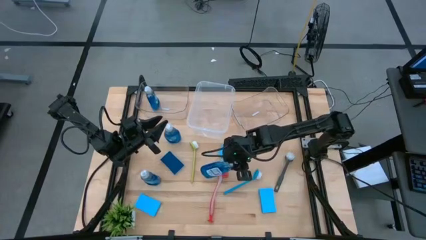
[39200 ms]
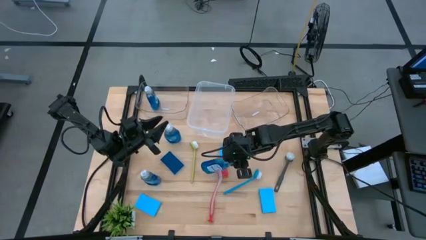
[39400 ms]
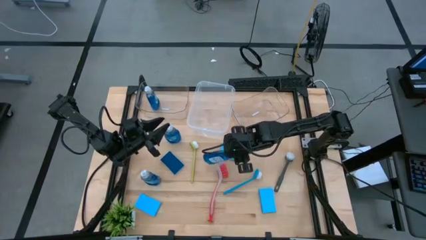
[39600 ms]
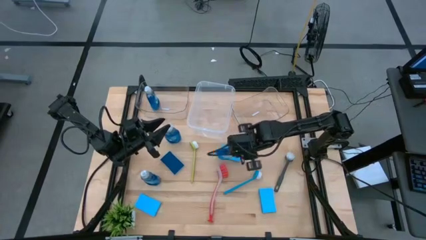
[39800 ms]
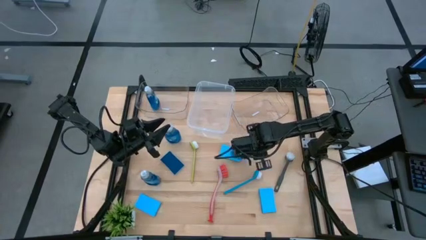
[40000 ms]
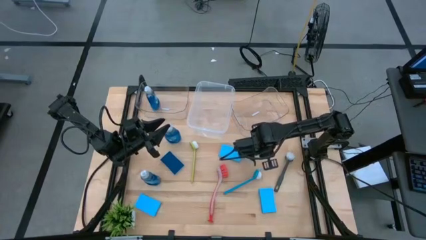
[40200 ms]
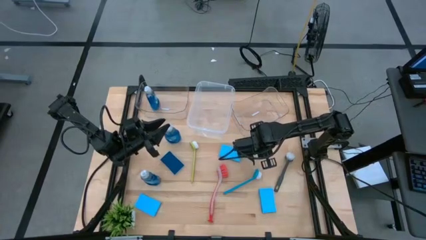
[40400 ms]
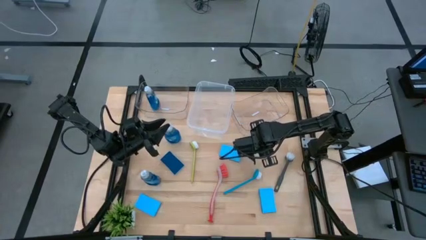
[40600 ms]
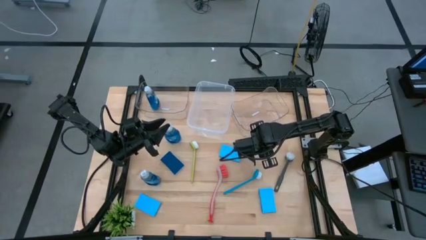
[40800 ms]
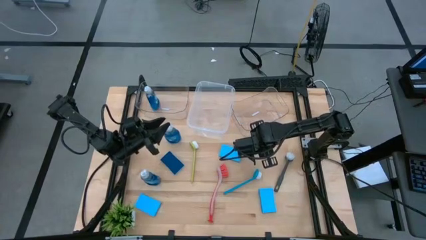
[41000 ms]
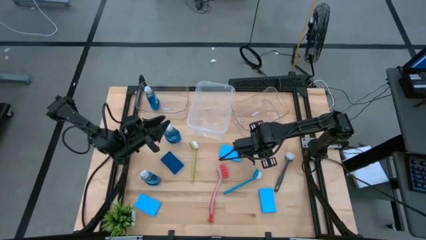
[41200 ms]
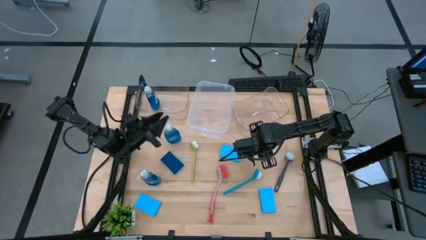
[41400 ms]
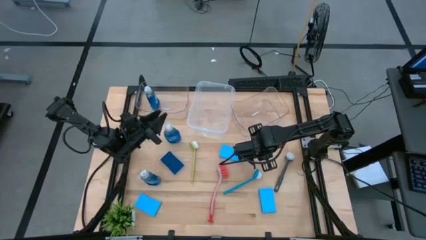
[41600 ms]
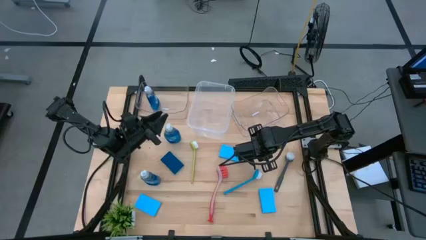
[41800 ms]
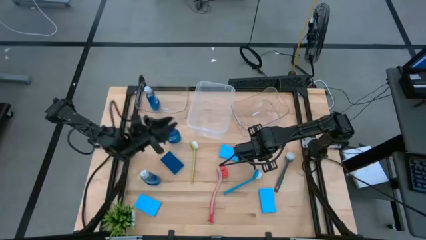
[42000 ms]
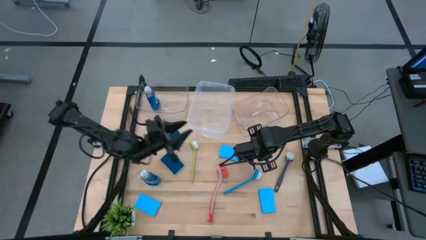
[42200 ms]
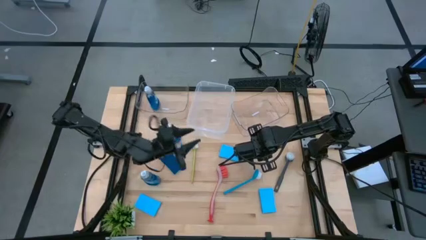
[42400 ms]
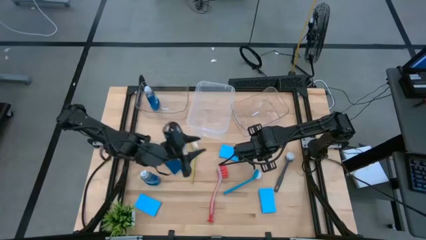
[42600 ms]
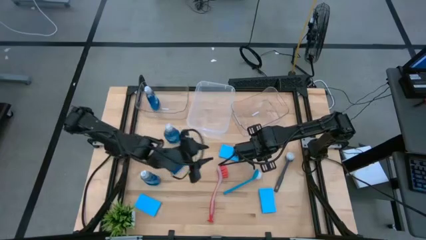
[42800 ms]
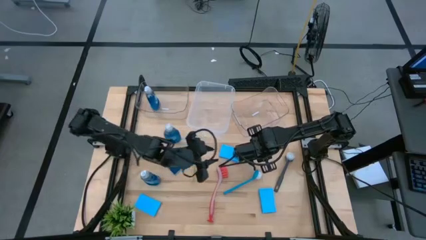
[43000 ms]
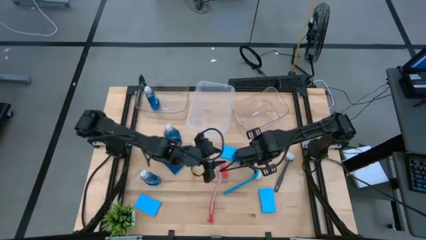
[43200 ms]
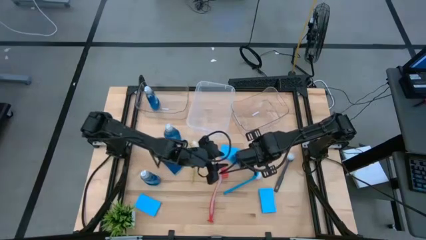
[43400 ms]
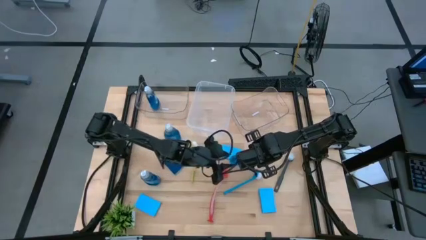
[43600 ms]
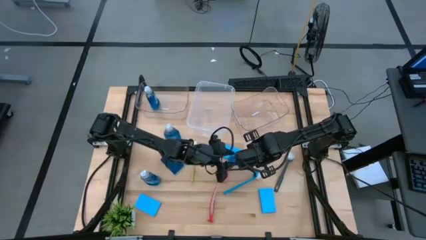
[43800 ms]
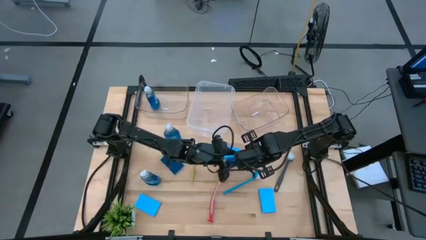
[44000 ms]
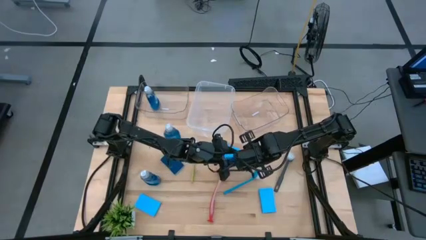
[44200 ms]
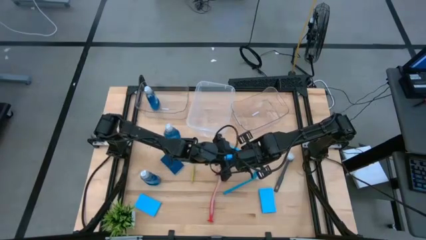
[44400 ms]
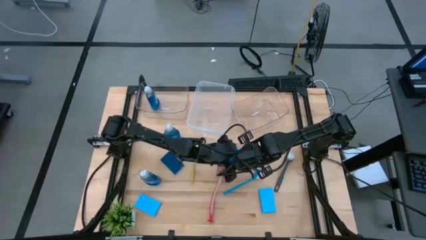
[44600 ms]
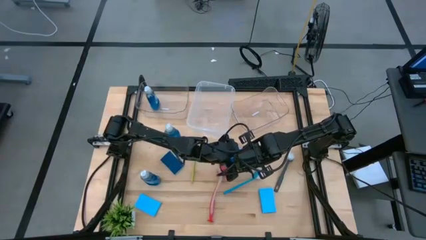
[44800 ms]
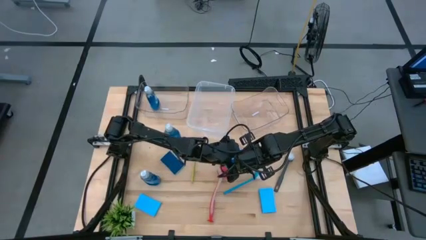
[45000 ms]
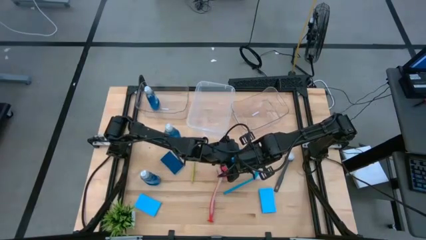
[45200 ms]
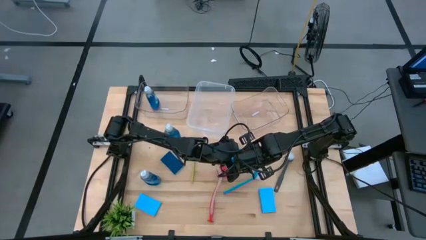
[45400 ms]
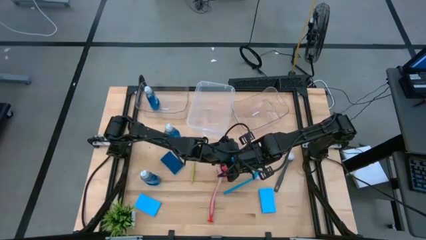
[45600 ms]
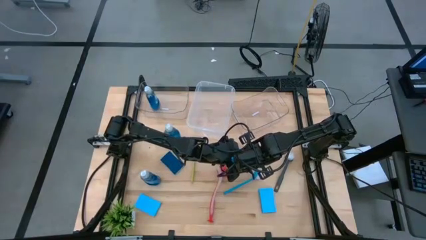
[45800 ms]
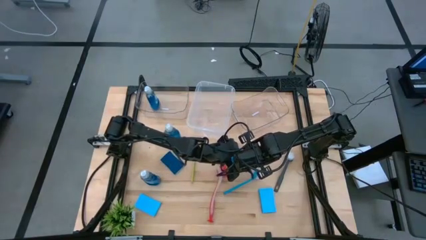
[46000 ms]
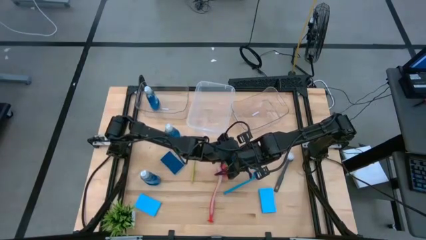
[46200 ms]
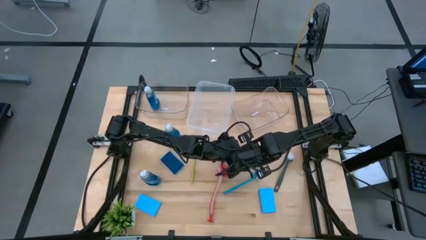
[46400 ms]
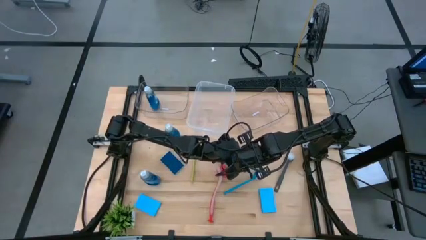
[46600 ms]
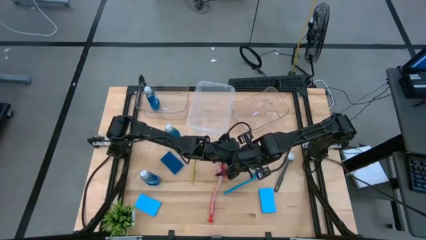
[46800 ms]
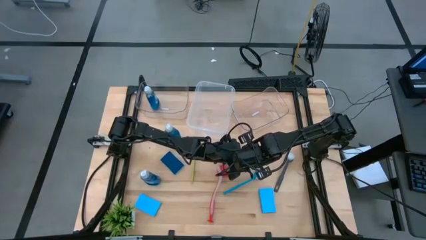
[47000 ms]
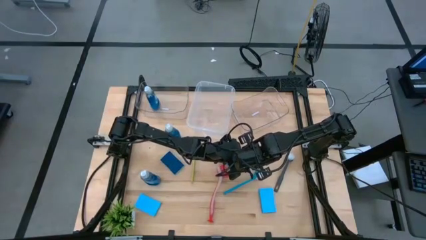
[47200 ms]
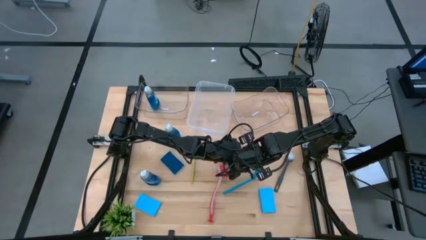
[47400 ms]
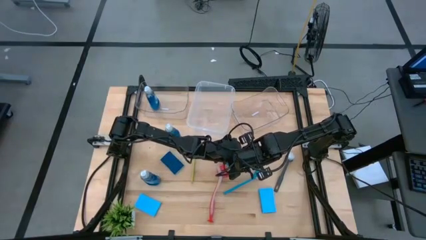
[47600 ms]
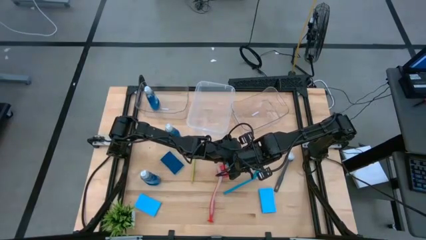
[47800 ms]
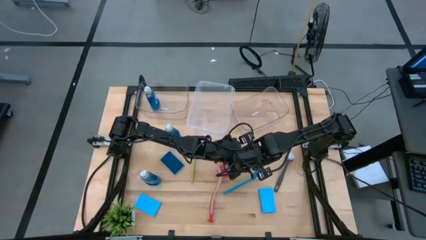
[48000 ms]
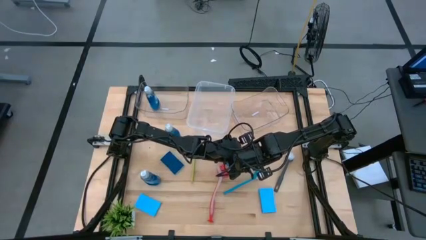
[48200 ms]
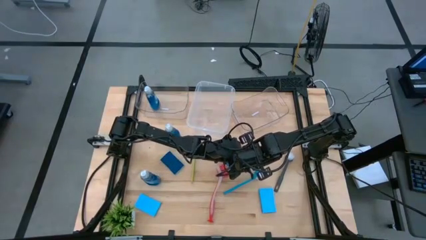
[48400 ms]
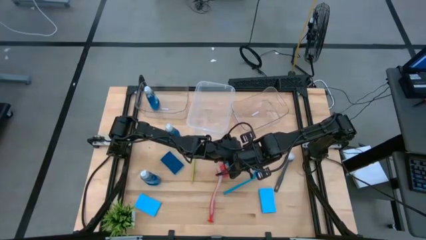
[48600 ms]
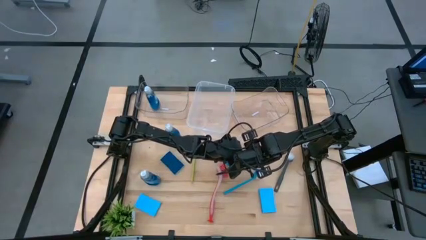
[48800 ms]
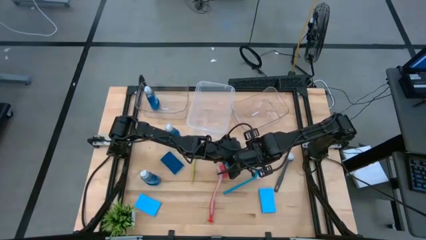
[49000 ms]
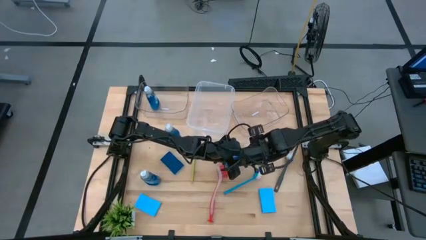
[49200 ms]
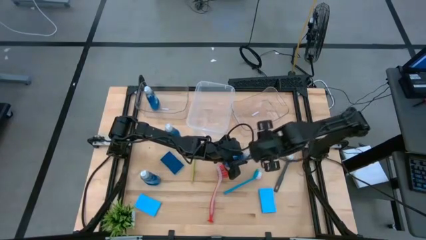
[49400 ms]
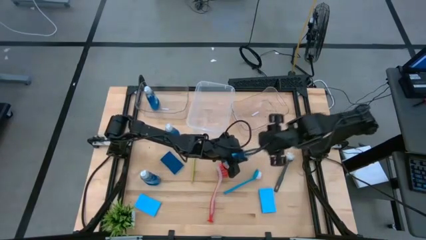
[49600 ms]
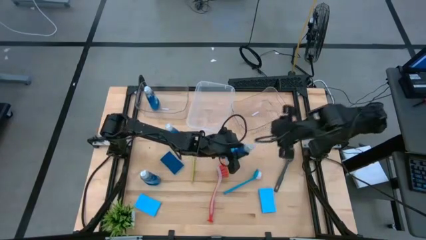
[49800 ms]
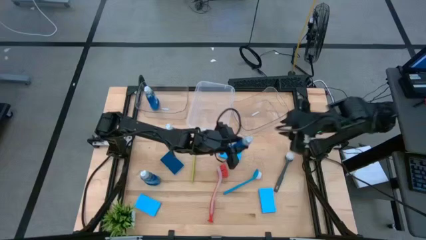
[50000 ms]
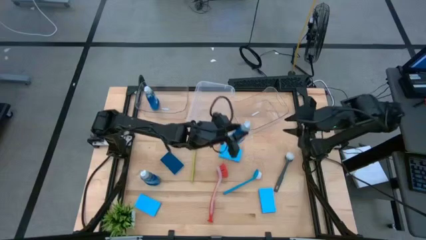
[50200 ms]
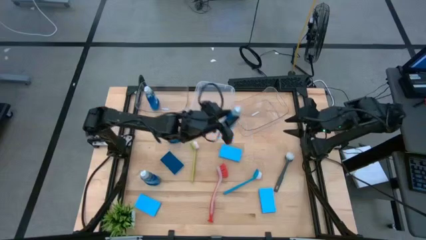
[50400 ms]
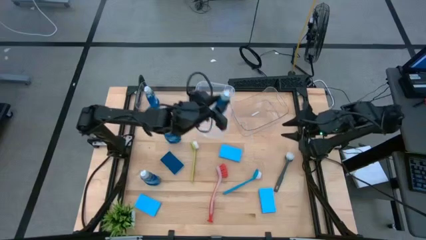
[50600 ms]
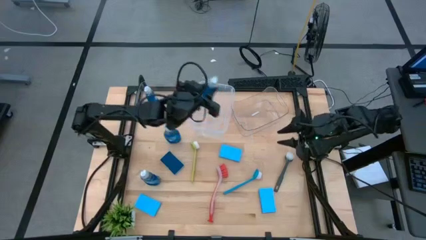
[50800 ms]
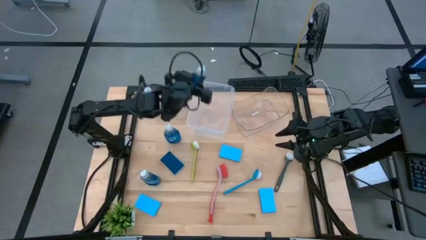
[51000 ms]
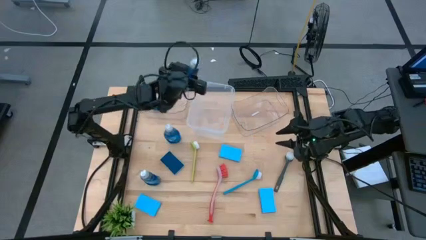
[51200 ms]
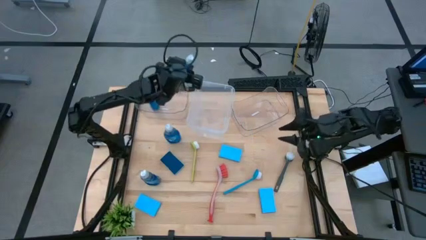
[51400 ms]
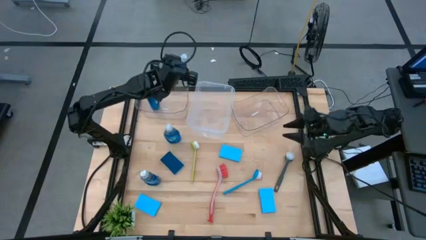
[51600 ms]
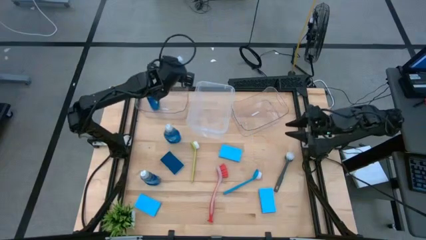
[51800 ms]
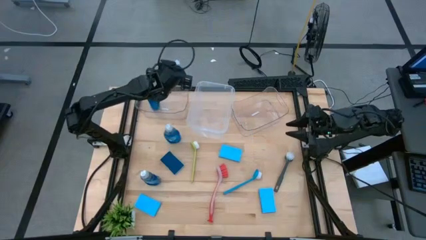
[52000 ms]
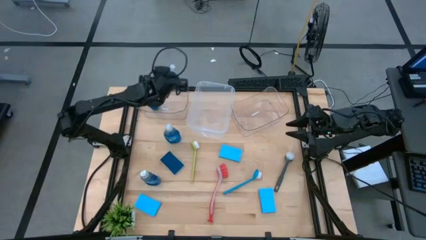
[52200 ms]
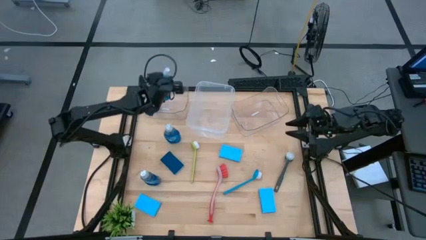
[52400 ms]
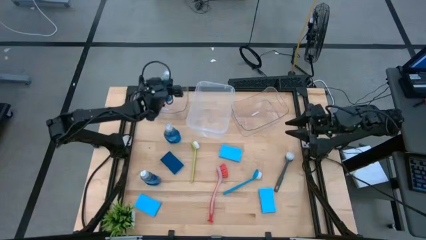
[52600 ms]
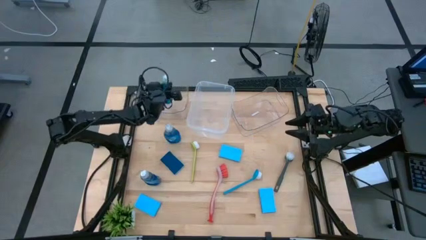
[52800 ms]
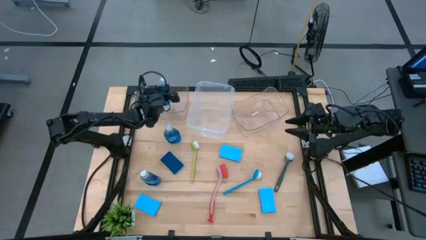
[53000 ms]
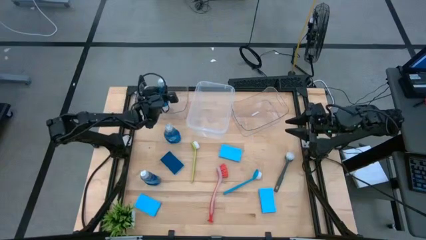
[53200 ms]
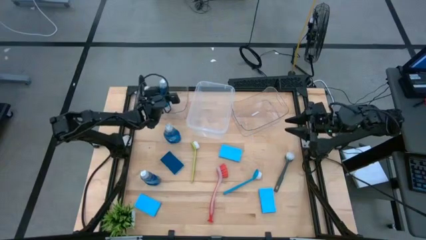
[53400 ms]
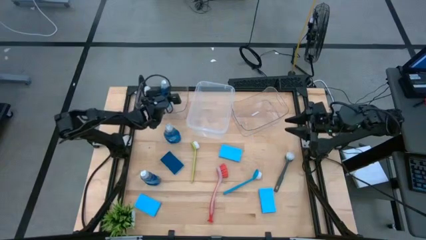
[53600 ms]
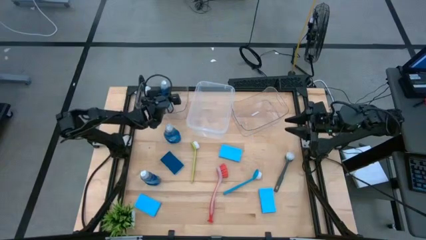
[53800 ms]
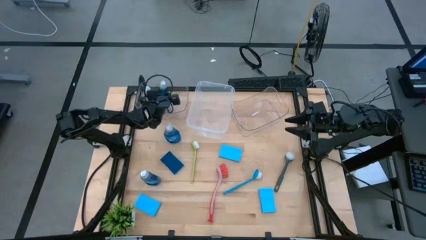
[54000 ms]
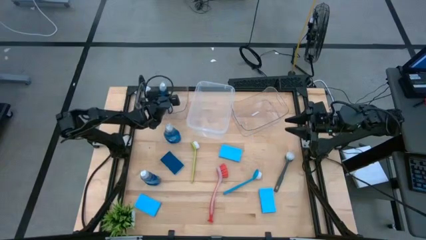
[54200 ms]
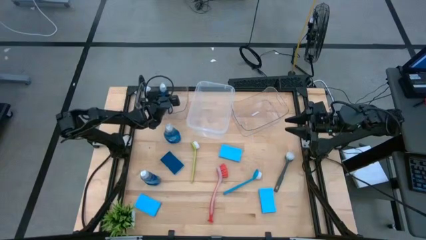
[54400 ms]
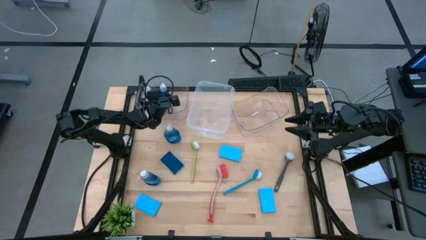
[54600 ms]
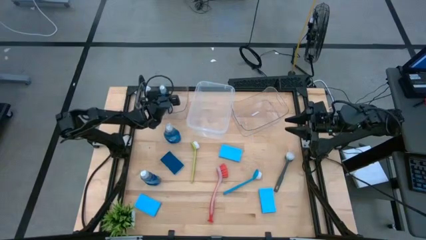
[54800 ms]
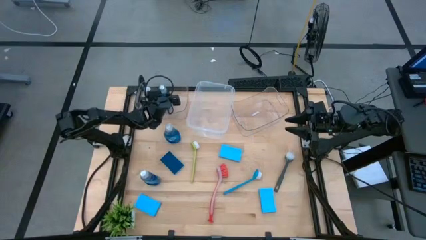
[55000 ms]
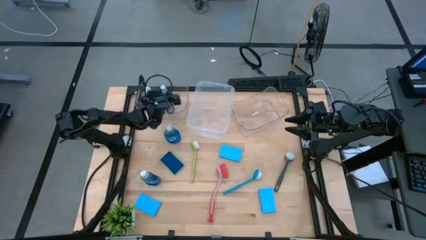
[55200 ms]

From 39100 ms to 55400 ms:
Task: Pick & Place Kitchen Sink Supplies
Put the dish soap into the left transparent bin
